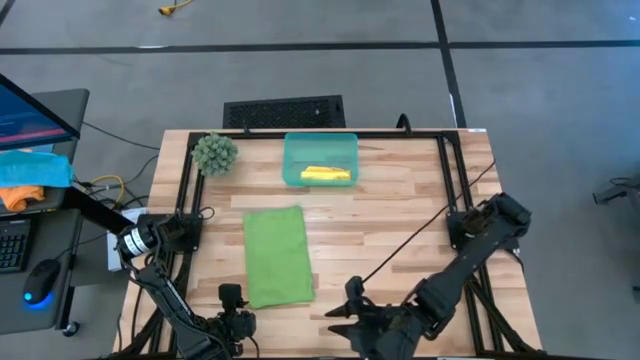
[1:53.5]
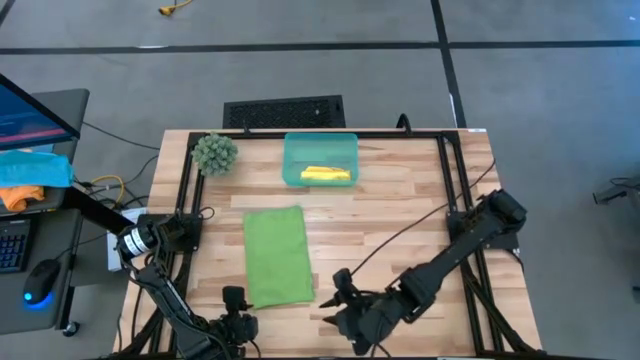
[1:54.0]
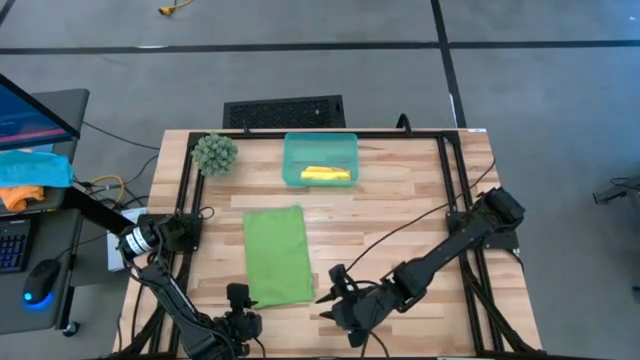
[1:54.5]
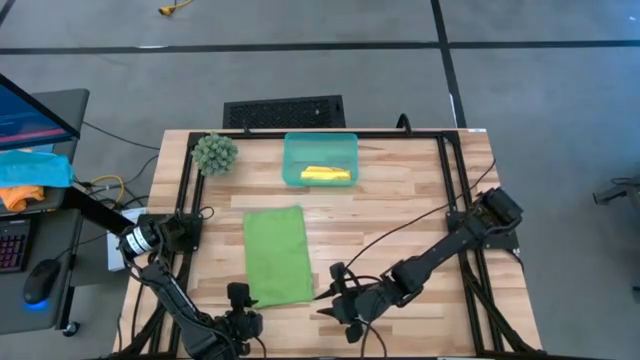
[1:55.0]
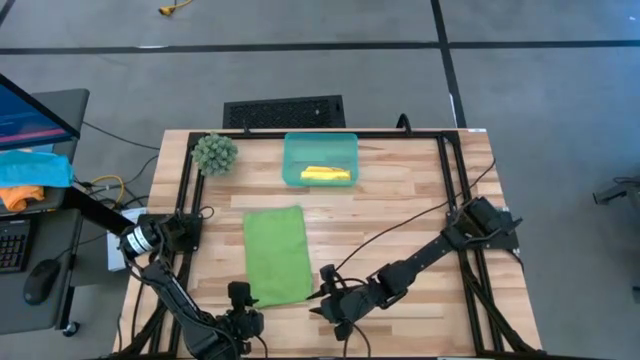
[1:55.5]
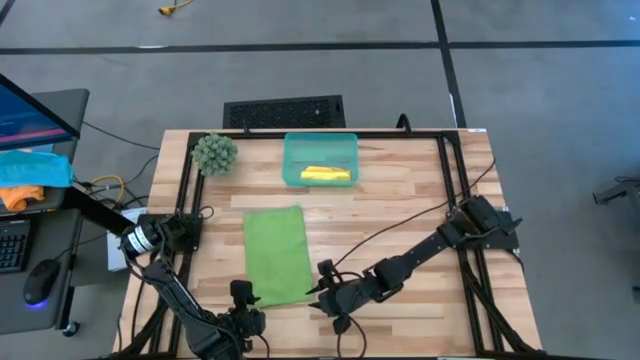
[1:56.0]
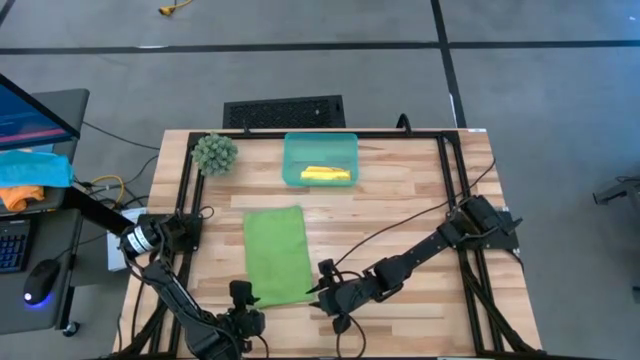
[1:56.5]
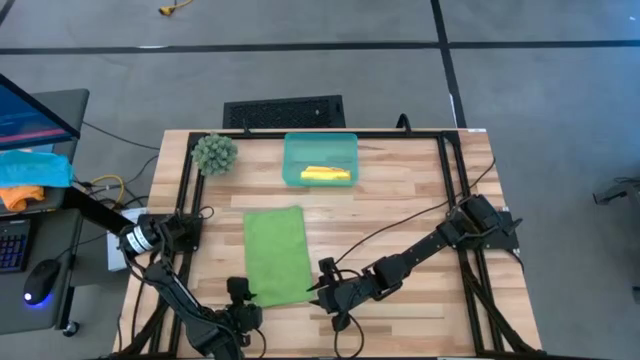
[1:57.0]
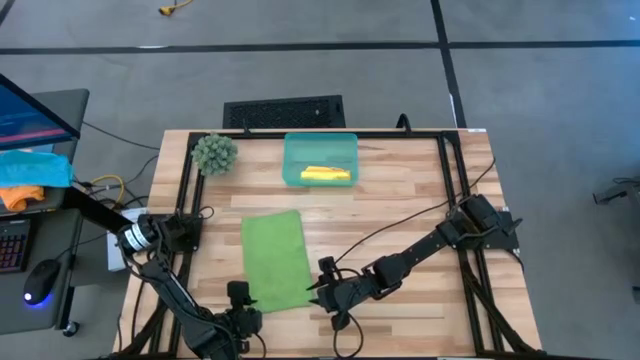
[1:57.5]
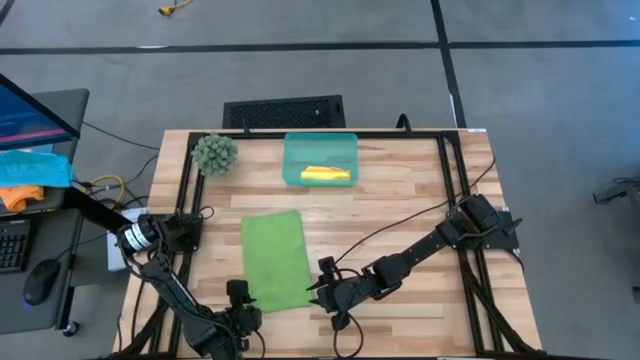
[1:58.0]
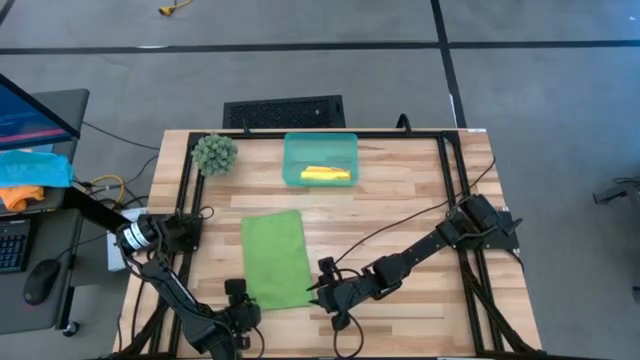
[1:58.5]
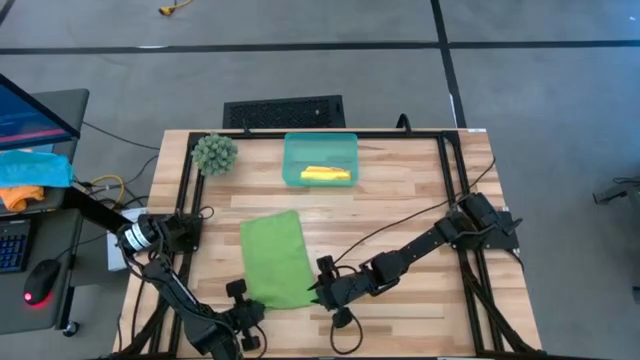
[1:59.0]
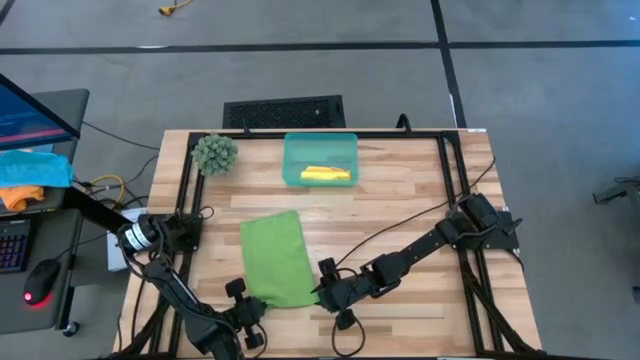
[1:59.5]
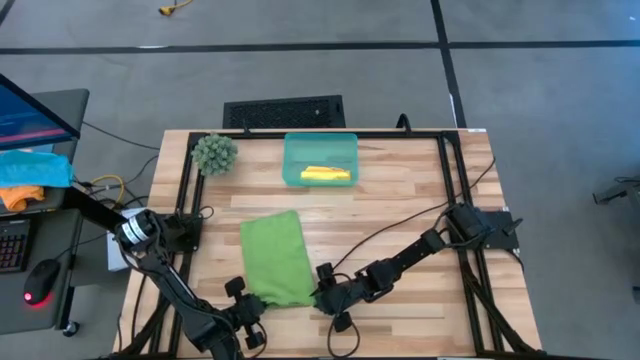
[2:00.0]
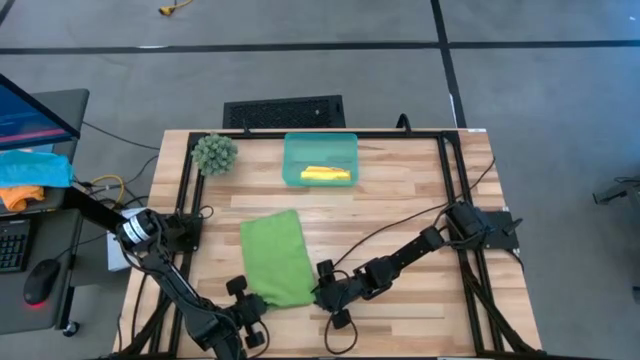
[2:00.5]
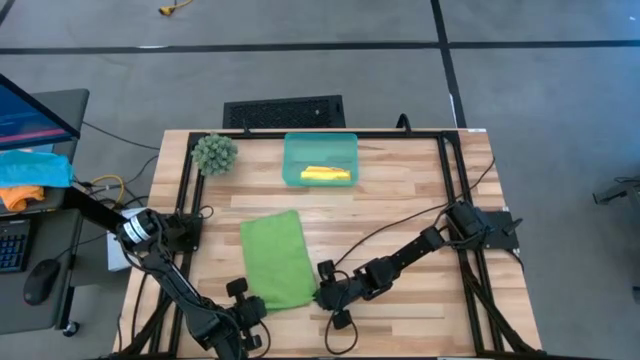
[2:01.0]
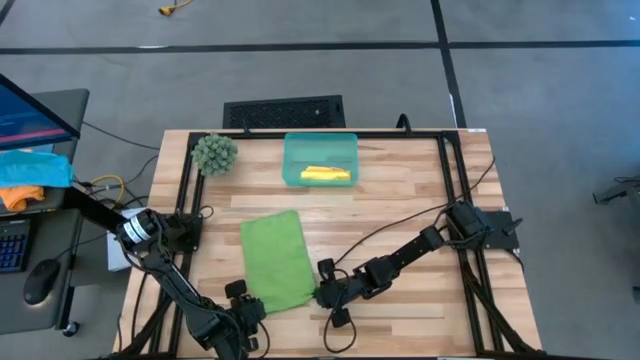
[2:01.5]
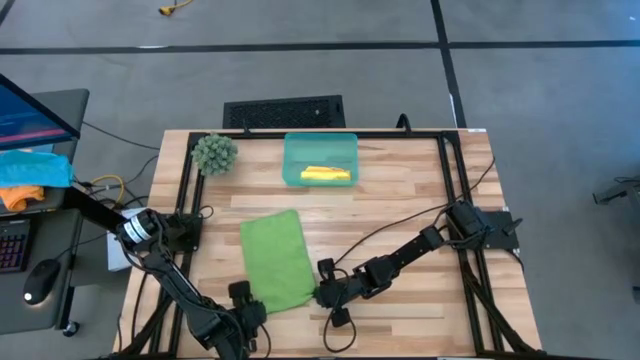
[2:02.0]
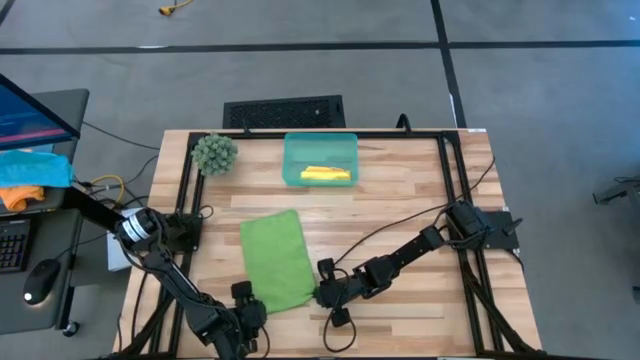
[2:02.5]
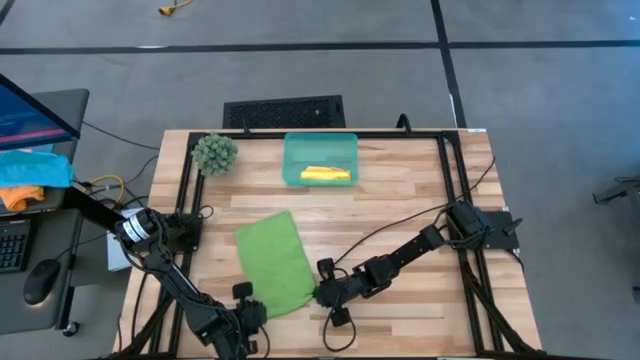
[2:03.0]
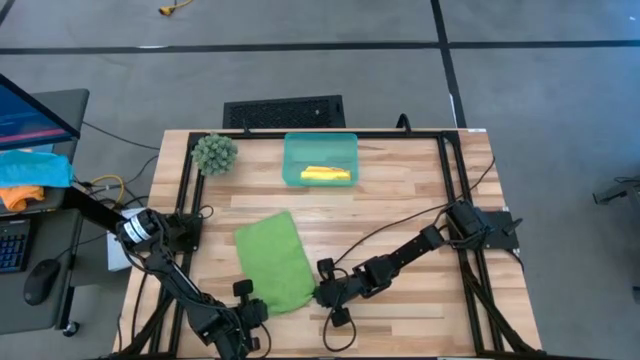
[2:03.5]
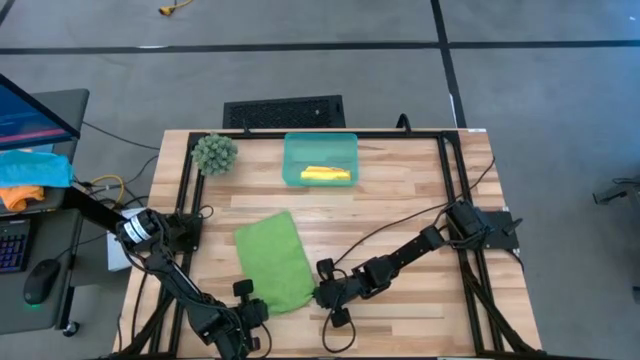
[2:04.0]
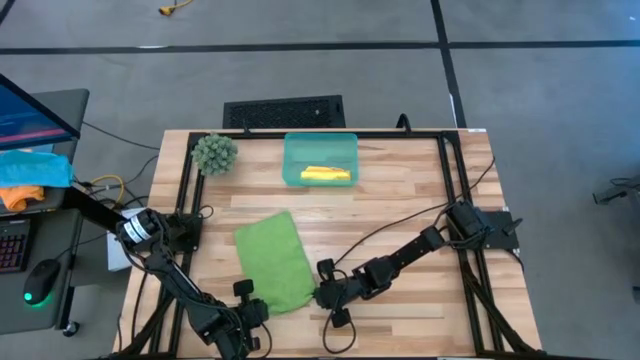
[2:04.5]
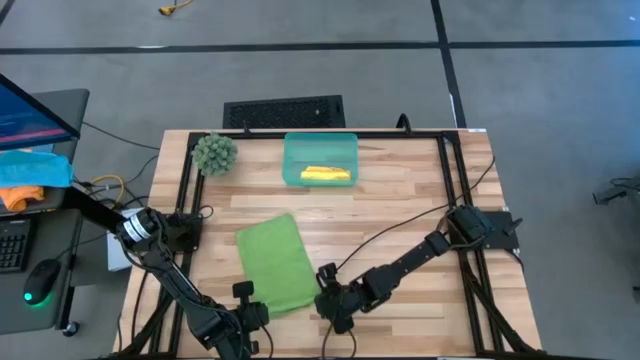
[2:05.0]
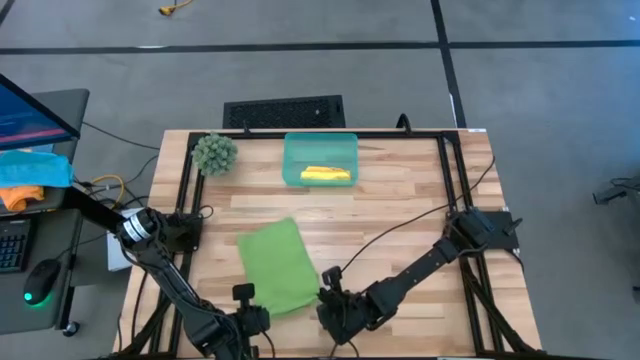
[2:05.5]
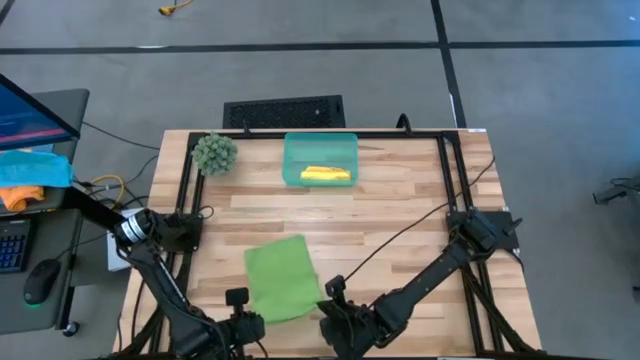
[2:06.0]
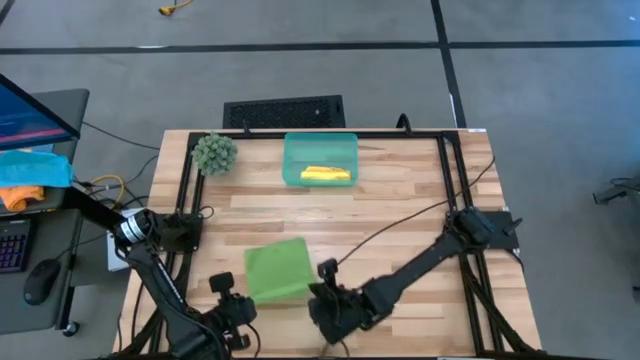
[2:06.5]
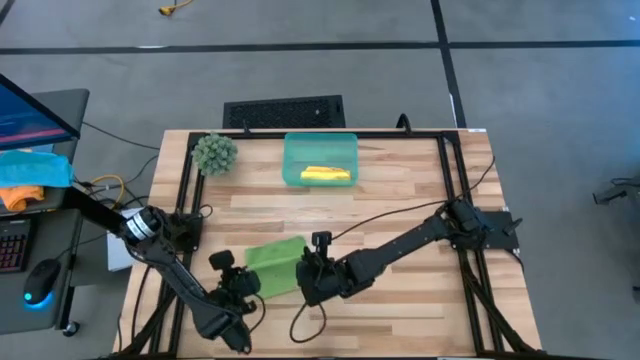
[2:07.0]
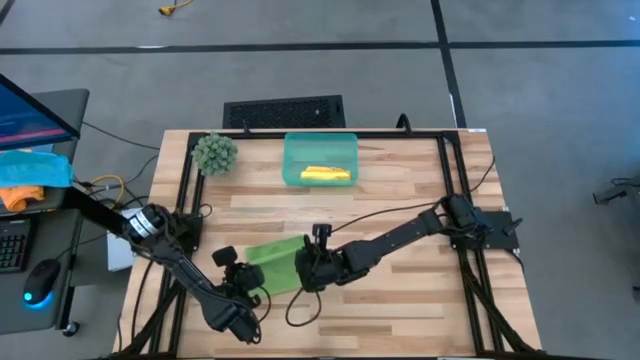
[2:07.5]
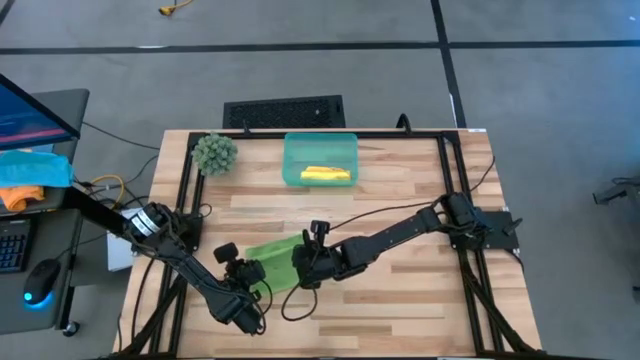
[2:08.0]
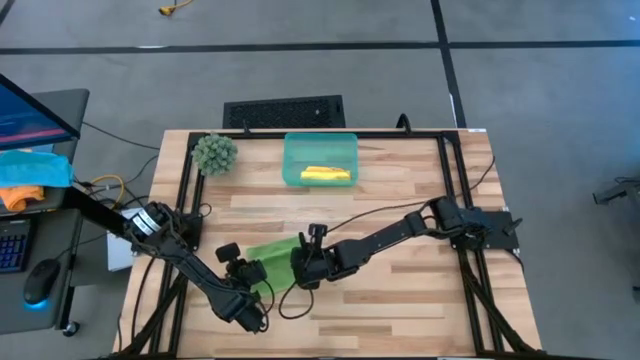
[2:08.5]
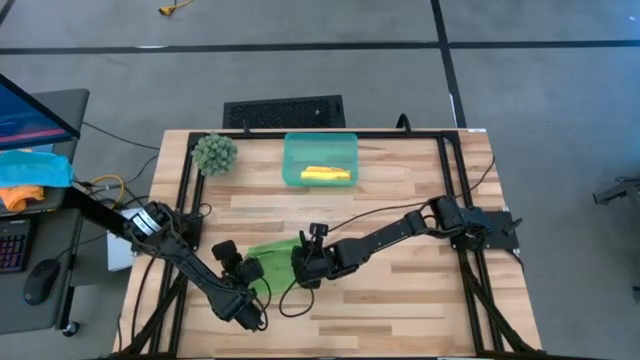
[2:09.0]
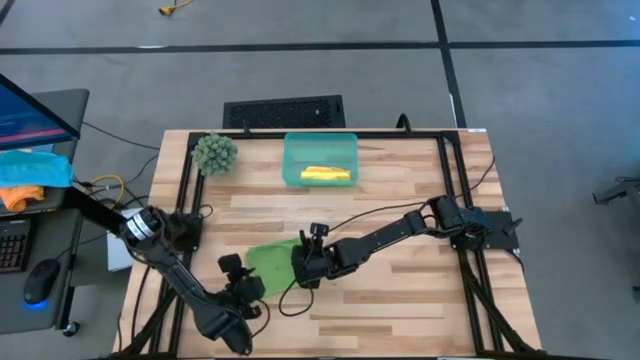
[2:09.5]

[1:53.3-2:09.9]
Task: Roll microfiber towels into tight, uniform cylinder then place into a basket
Fold the green microfiber cloth
